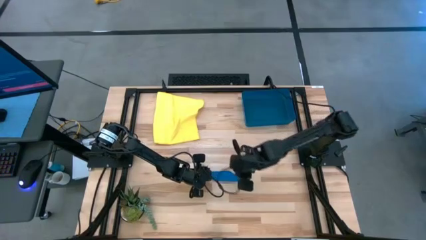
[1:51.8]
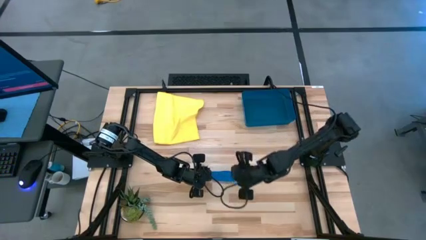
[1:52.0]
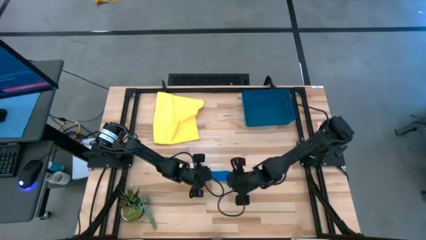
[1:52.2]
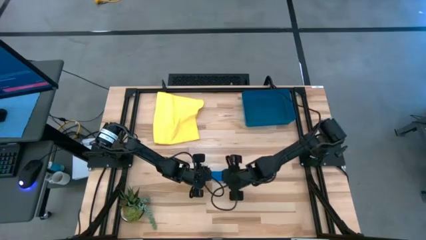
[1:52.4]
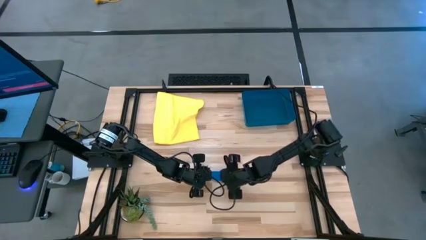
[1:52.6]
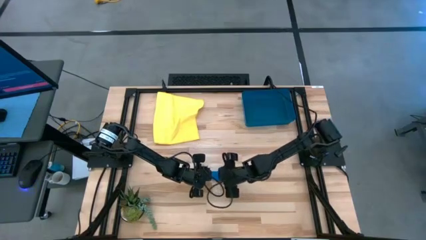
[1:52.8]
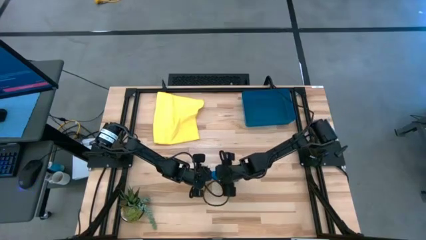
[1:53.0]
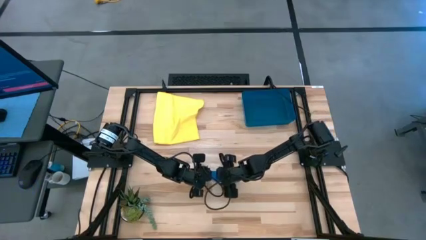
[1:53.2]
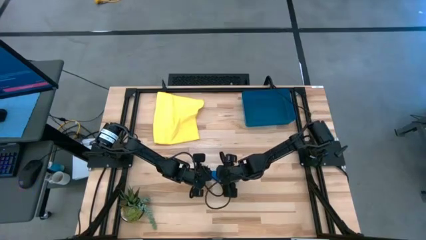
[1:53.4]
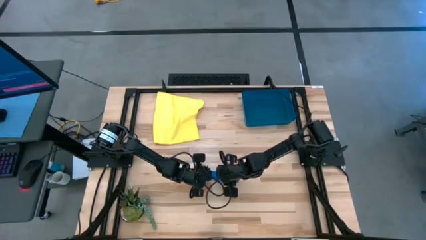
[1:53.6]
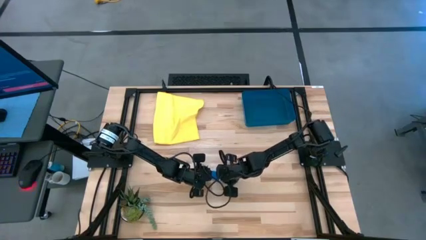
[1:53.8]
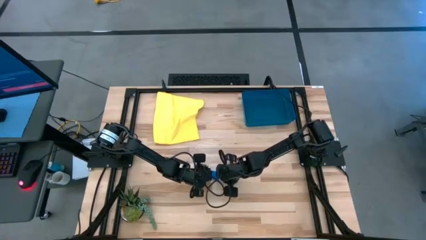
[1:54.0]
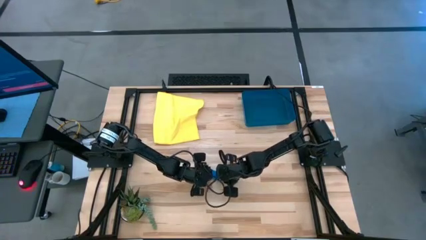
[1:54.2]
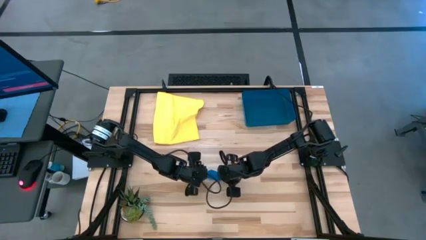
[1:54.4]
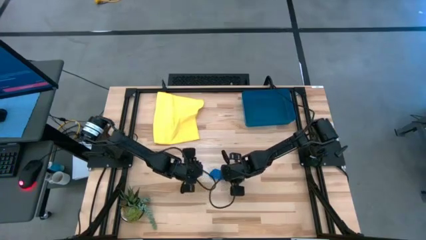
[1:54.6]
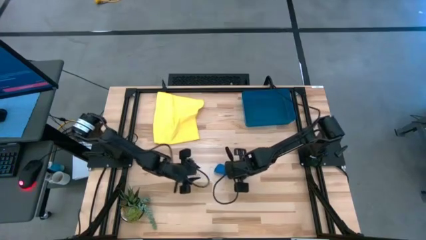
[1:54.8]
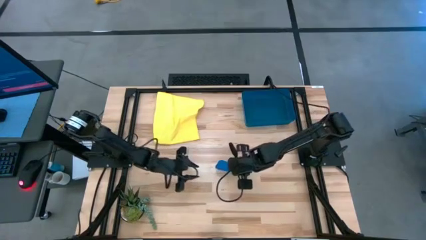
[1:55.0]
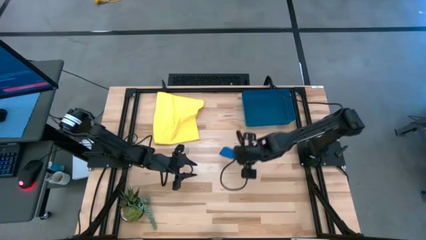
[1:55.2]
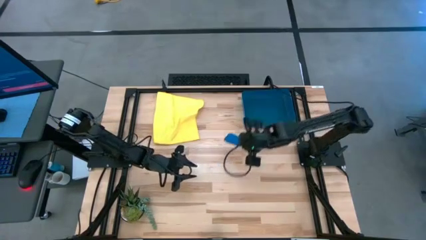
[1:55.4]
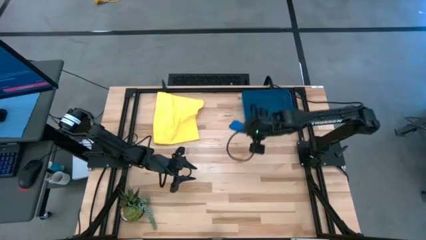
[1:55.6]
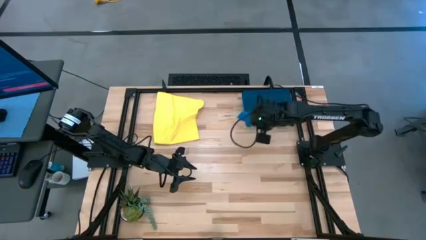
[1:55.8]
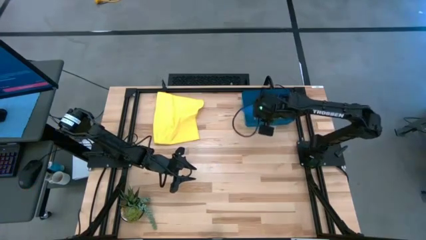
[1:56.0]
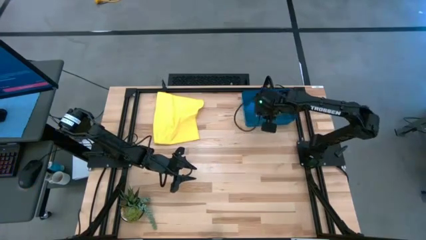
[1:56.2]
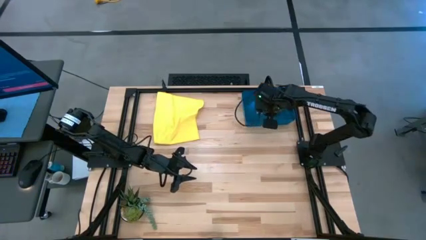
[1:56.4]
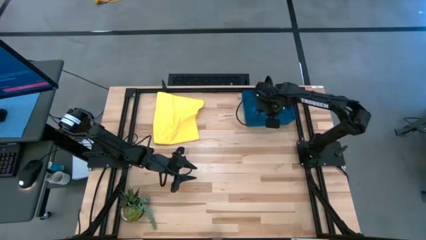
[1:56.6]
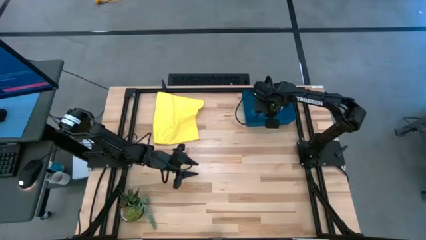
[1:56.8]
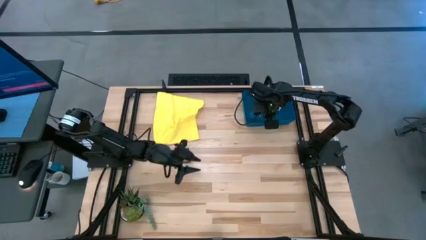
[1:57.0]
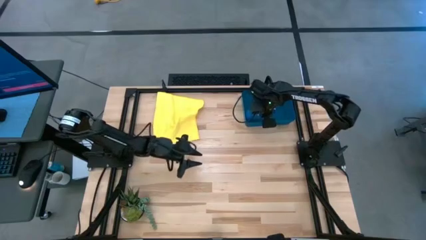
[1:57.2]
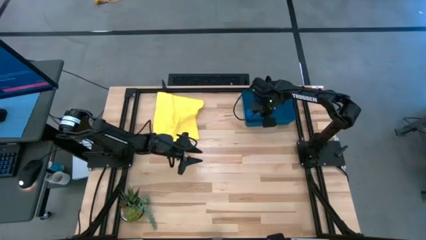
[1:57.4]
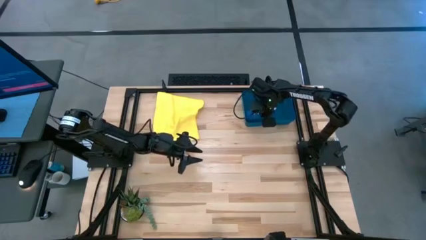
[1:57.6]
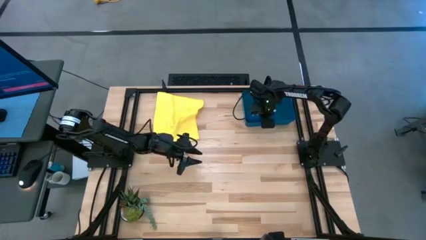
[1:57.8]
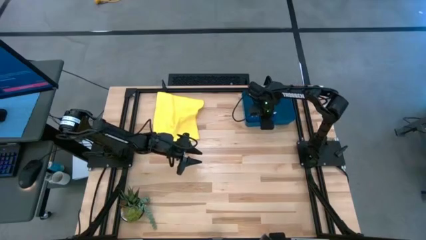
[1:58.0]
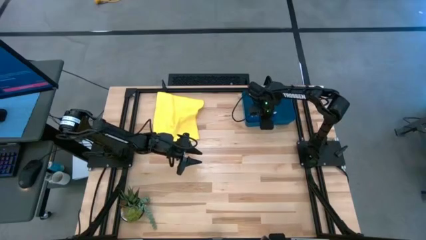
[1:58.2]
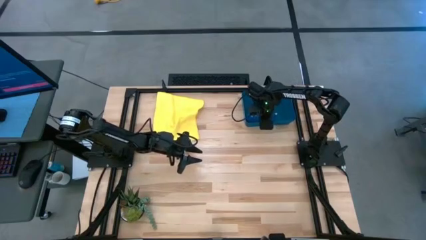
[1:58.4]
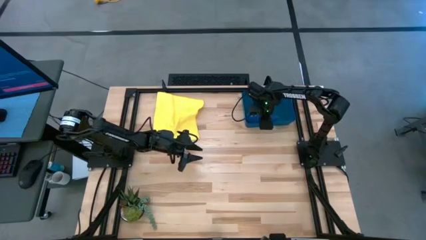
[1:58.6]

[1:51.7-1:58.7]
Task: Roll microfiber towels into tight, uniform cylinder then place into a basket
Put the rolled blue microfiber cloth into the blue bin

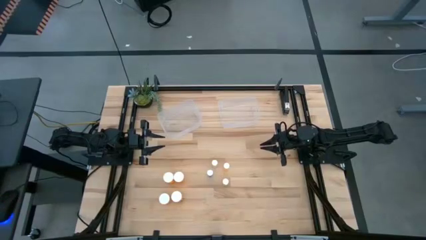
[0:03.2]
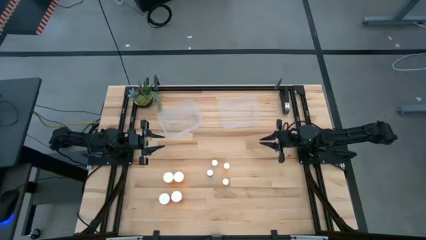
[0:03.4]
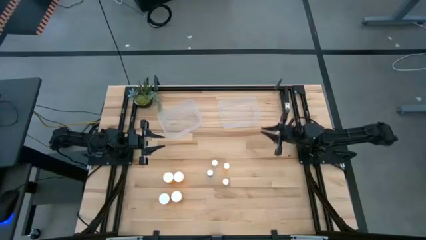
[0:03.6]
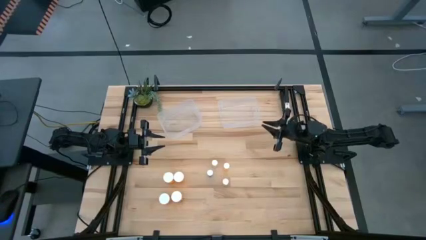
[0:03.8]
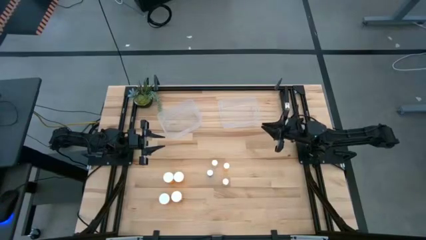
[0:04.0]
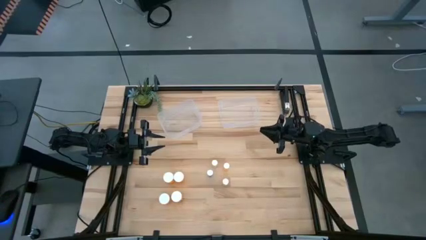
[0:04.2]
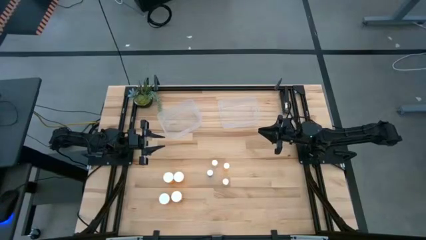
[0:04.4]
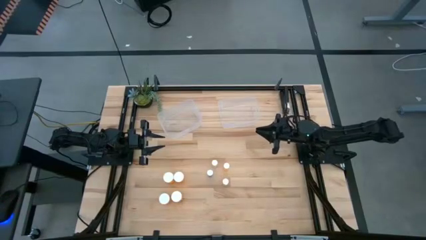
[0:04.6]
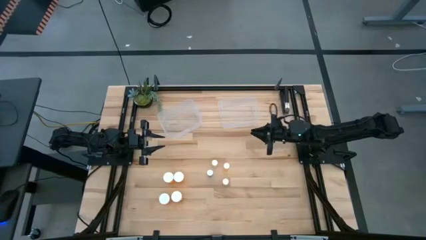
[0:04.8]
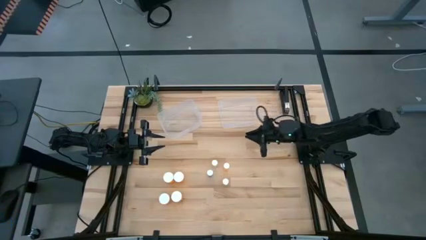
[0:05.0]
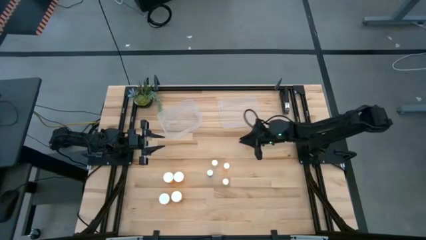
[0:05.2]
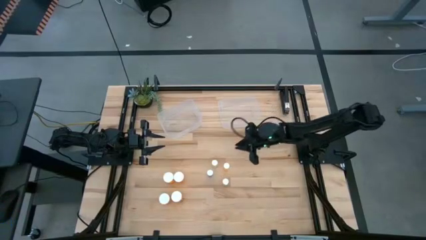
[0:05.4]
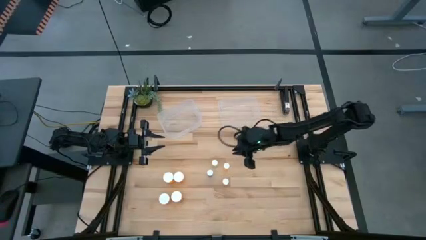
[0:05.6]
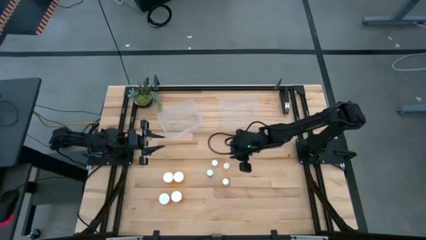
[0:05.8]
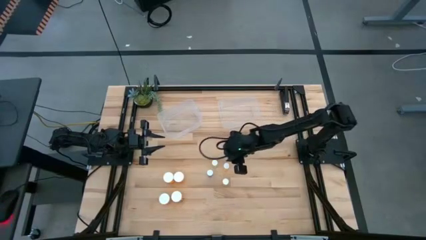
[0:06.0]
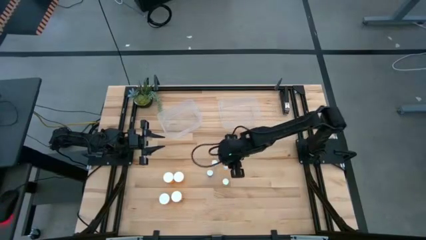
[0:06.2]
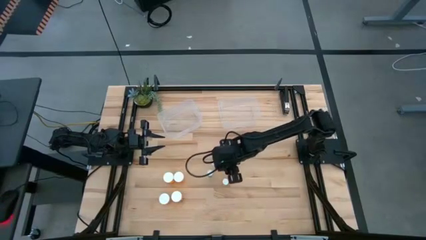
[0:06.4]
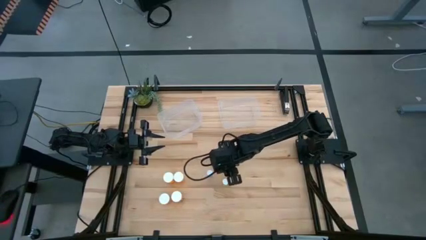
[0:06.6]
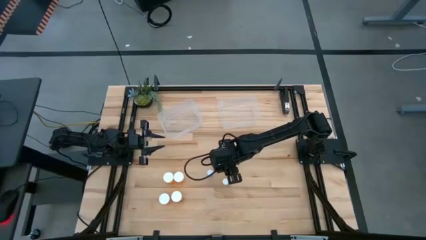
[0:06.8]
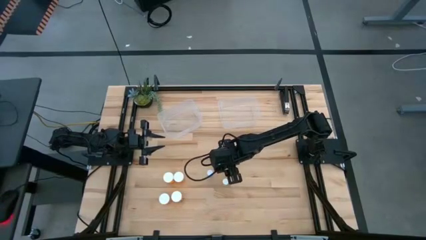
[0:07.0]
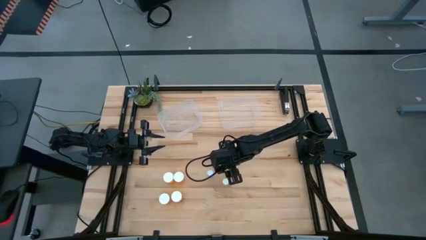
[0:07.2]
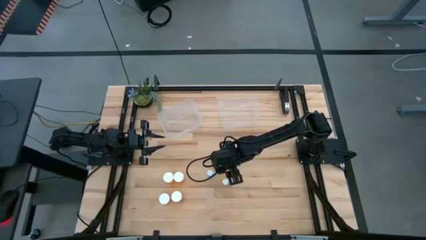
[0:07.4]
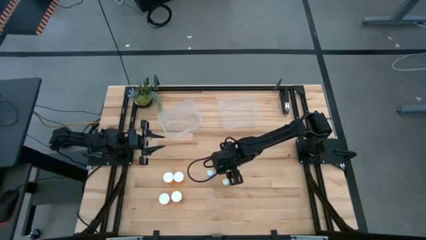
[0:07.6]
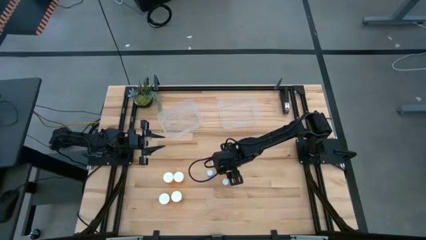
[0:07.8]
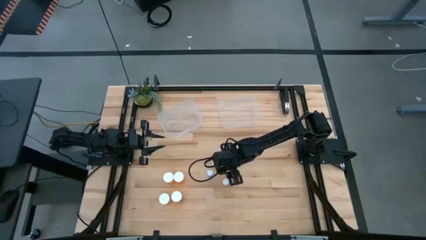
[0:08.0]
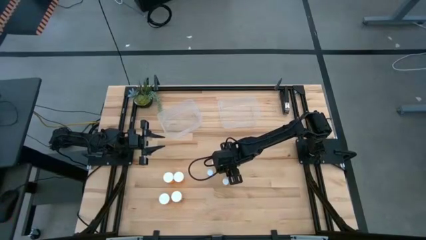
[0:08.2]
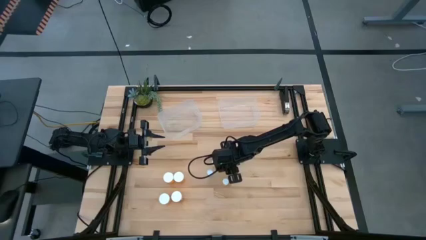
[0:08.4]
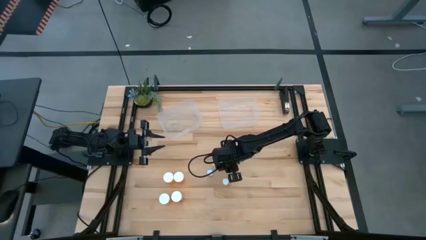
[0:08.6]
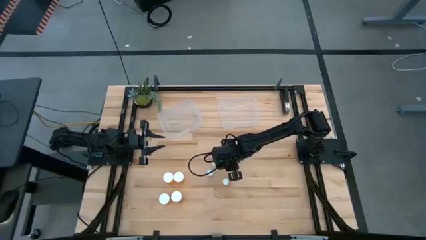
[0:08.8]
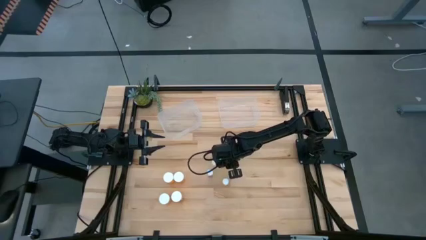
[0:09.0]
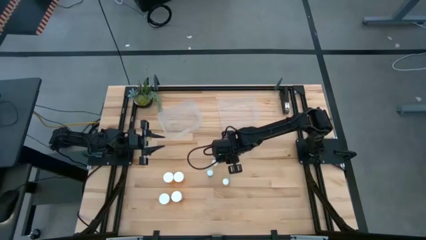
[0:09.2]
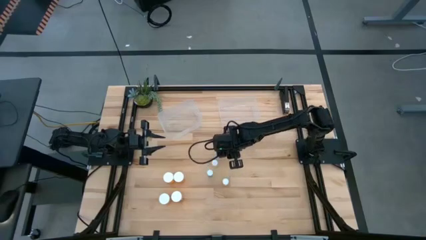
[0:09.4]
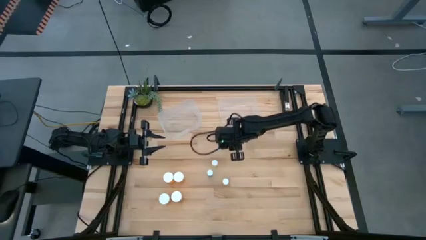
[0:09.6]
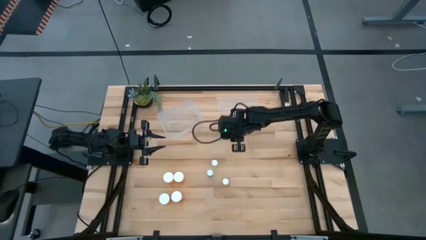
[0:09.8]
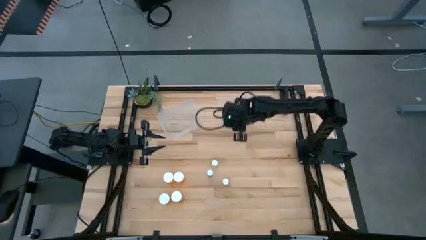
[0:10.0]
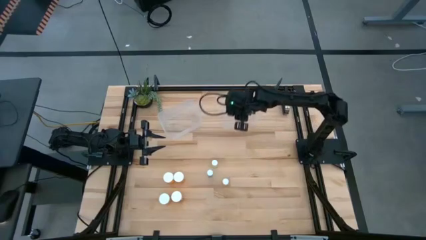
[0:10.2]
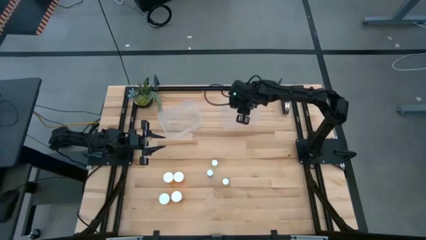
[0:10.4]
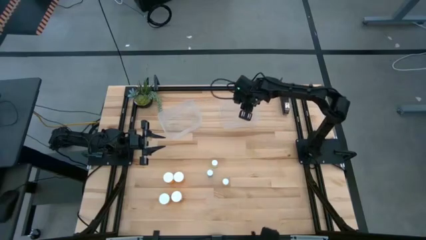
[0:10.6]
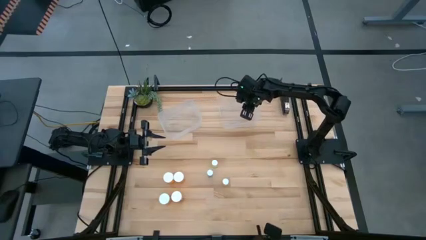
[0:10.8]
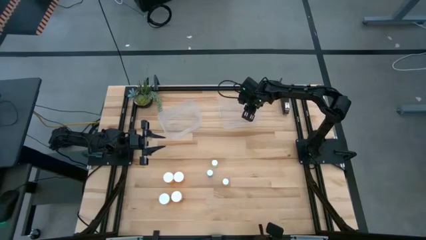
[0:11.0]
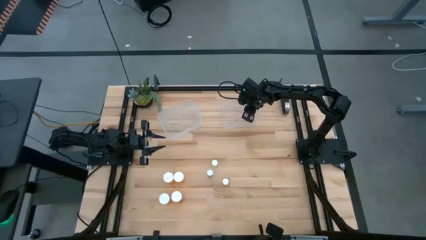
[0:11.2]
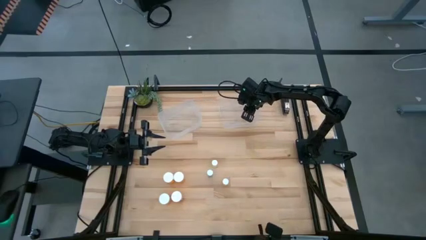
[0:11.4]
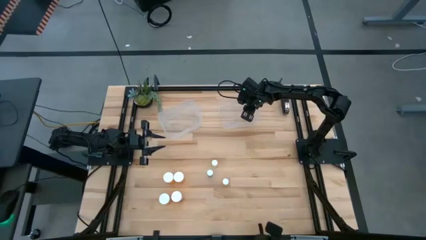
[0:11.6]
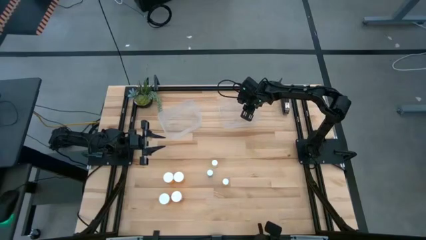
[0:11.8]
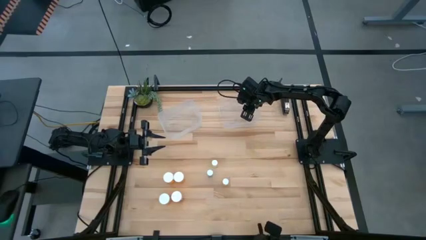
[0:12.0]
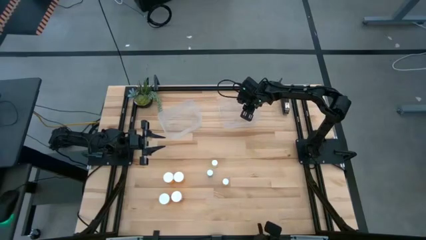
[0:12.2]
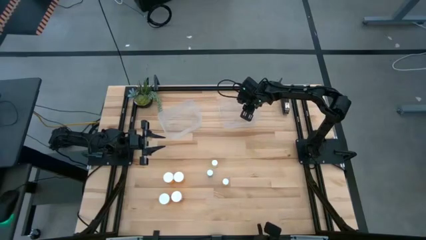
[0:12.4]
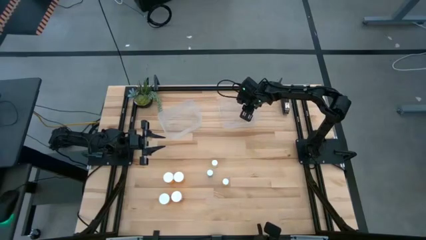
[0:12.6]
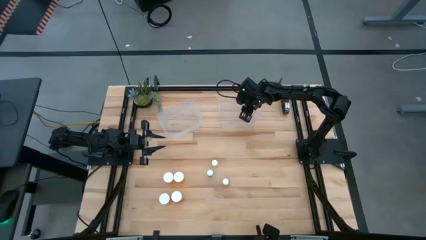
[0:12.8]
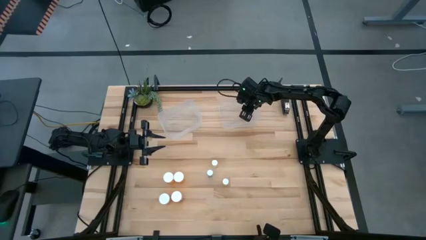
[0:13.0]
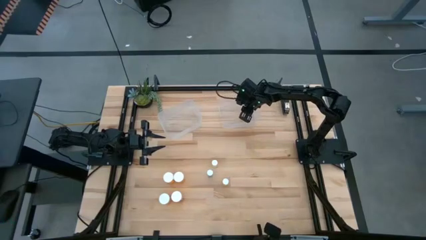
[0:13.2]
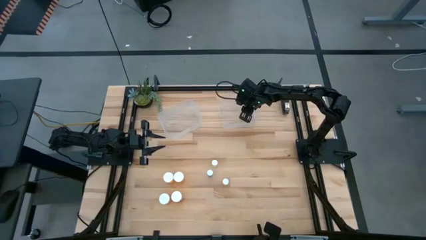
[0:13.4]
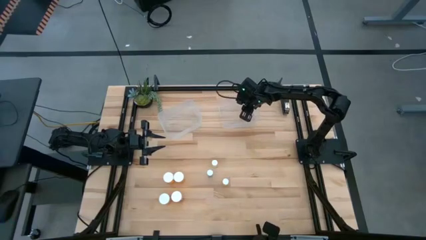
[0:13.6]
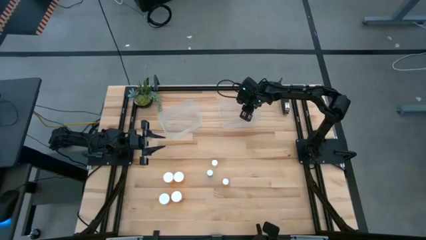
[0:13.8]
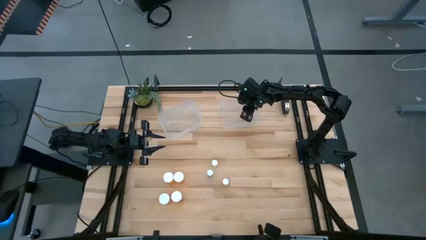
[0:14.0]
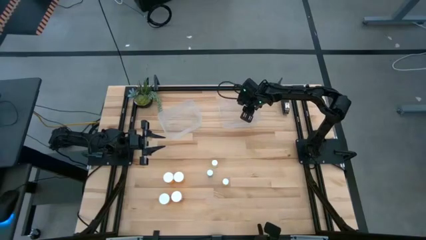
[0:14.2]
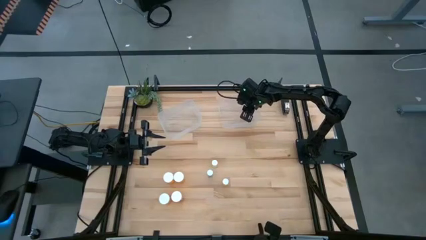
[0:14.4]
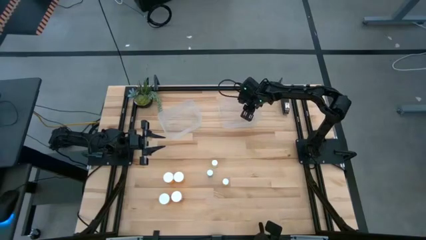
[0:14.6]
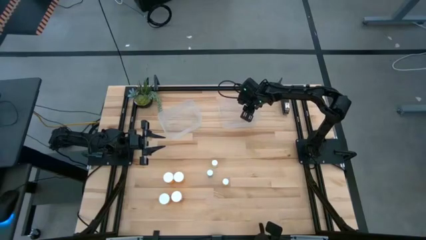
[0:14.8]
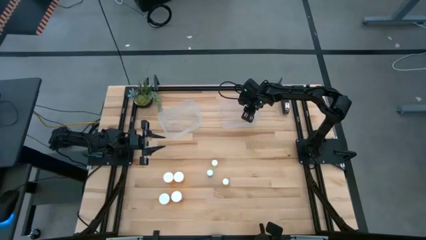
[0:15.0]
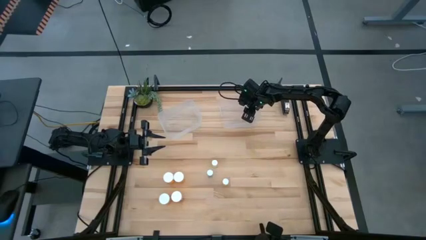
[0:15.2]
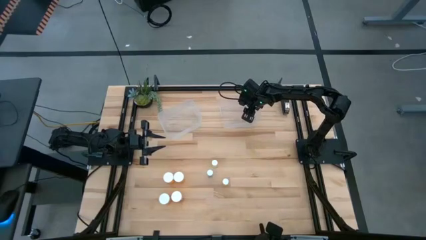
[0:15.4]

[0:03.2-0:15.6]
Task: Pick and place medicine bottles into bin by pill shape (circle, oval)
Put the small orange pill bottle into the right transparent bin
